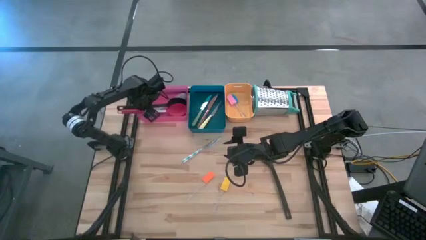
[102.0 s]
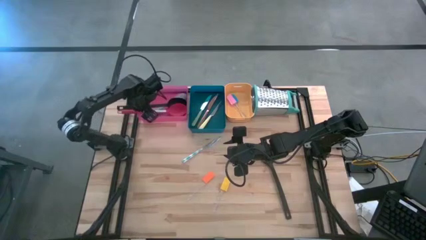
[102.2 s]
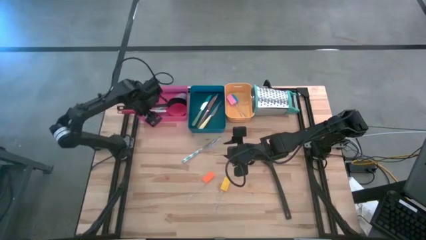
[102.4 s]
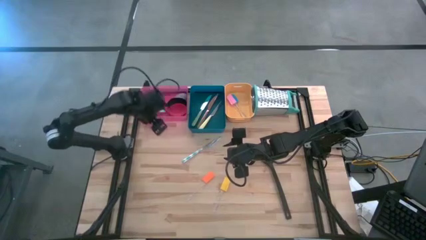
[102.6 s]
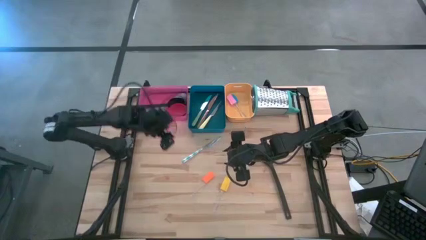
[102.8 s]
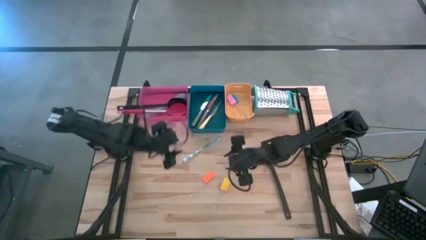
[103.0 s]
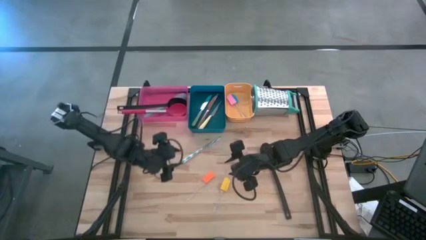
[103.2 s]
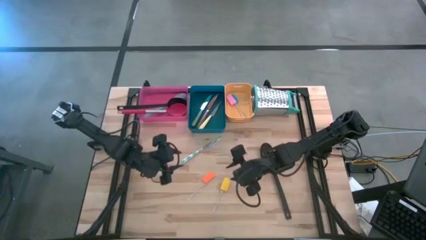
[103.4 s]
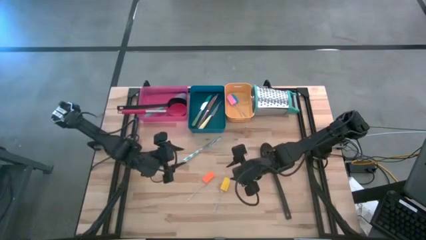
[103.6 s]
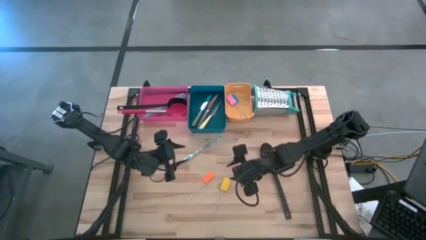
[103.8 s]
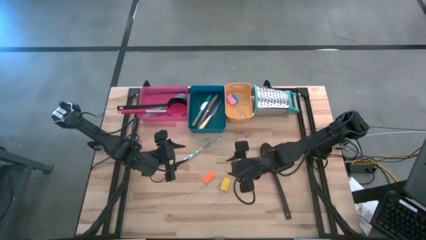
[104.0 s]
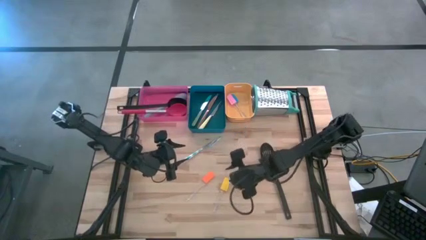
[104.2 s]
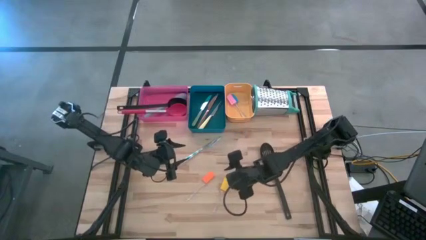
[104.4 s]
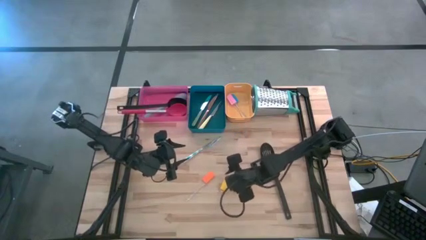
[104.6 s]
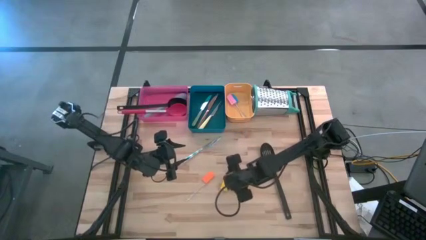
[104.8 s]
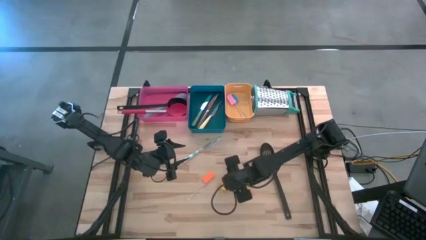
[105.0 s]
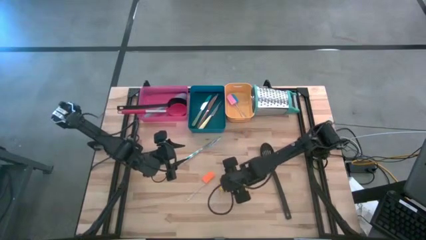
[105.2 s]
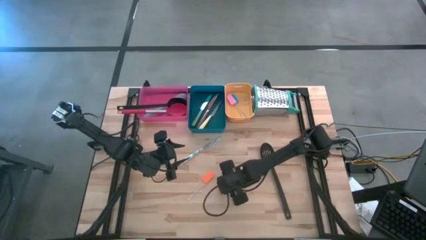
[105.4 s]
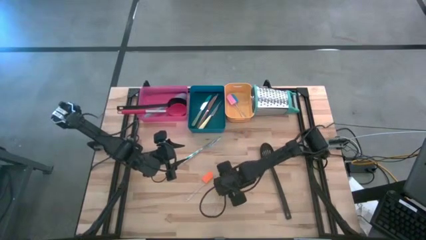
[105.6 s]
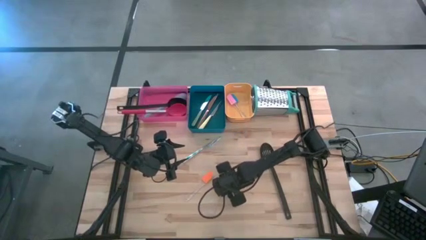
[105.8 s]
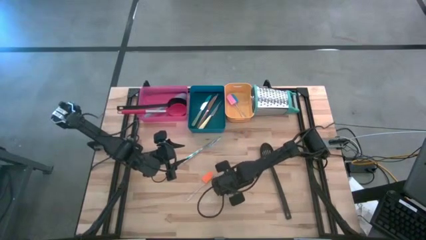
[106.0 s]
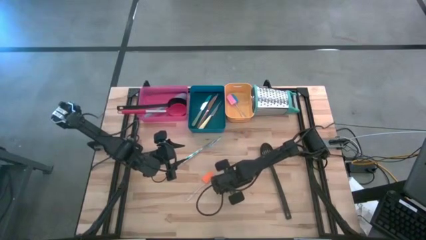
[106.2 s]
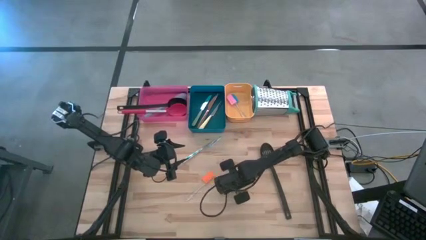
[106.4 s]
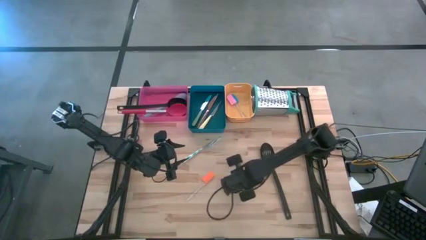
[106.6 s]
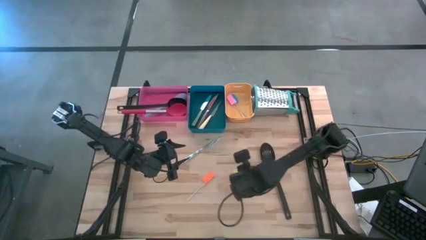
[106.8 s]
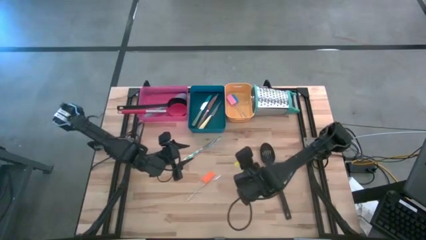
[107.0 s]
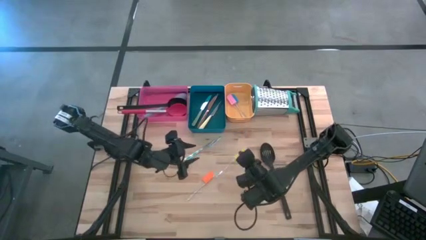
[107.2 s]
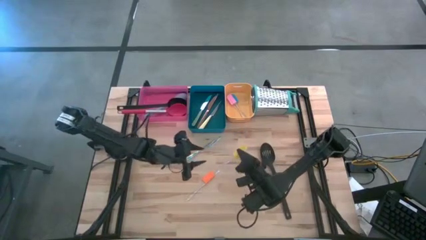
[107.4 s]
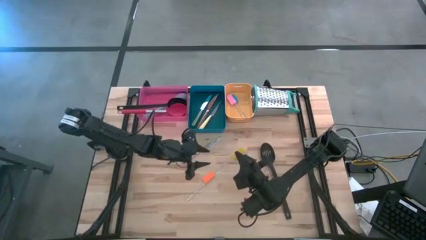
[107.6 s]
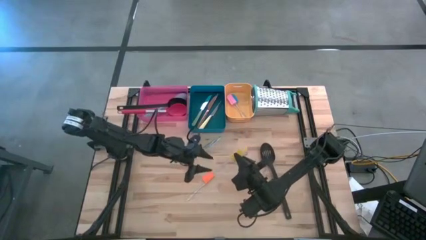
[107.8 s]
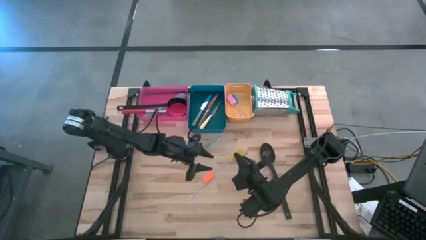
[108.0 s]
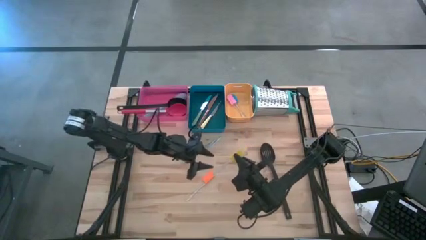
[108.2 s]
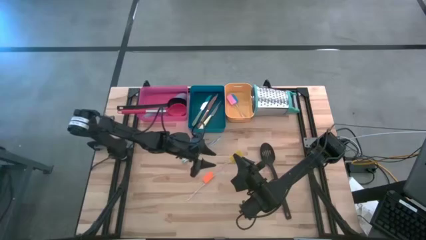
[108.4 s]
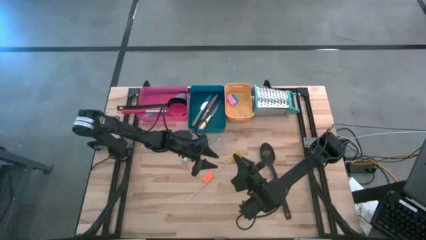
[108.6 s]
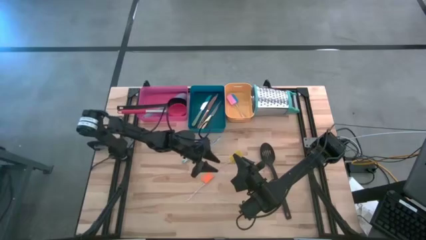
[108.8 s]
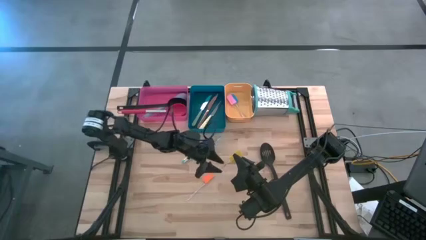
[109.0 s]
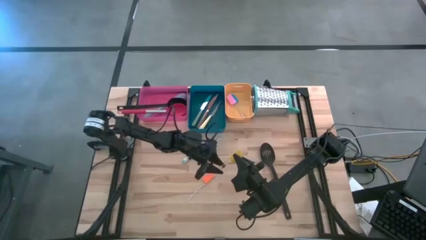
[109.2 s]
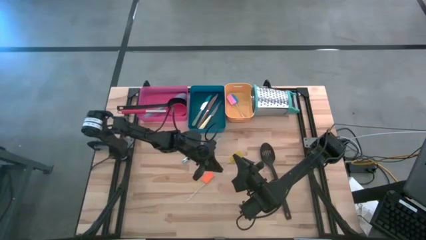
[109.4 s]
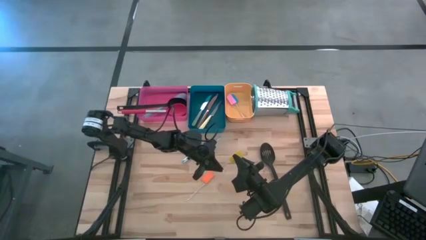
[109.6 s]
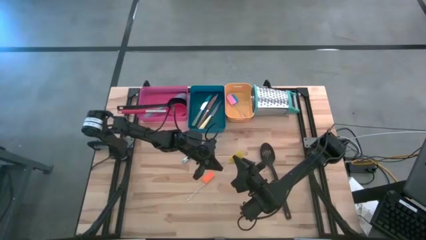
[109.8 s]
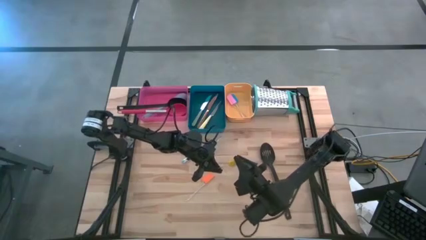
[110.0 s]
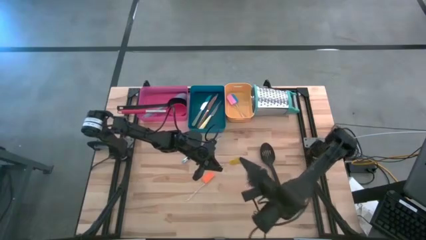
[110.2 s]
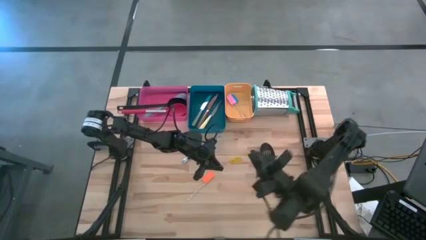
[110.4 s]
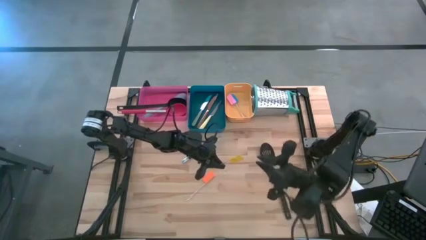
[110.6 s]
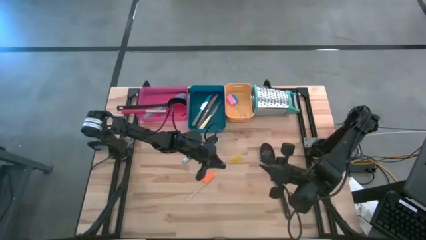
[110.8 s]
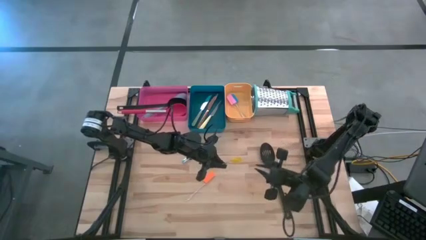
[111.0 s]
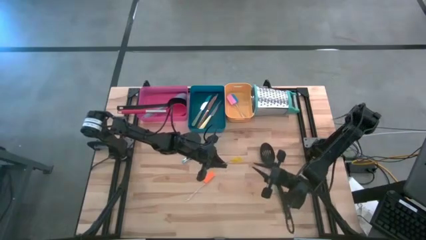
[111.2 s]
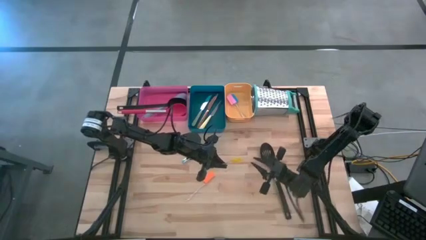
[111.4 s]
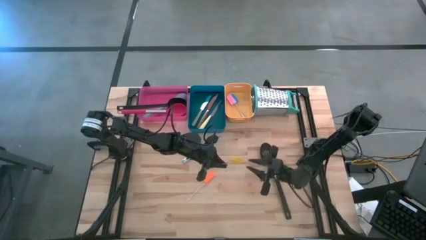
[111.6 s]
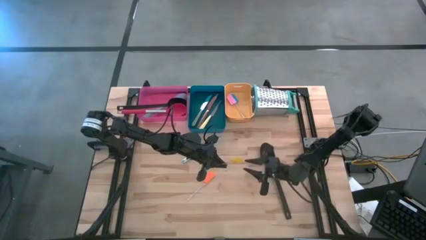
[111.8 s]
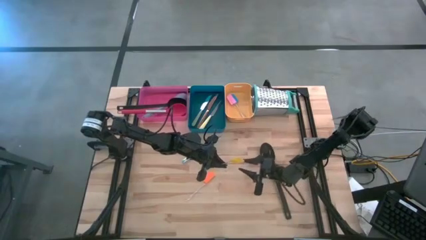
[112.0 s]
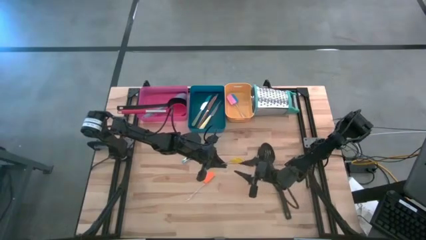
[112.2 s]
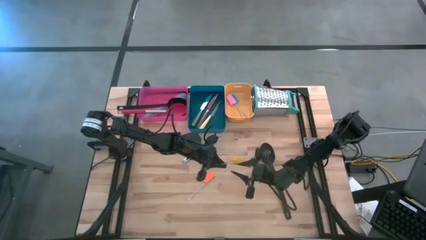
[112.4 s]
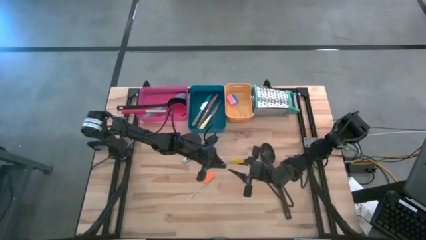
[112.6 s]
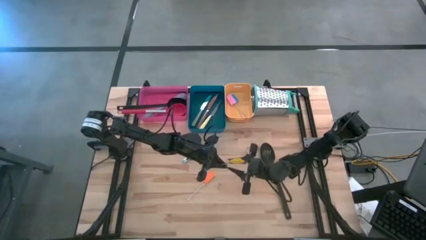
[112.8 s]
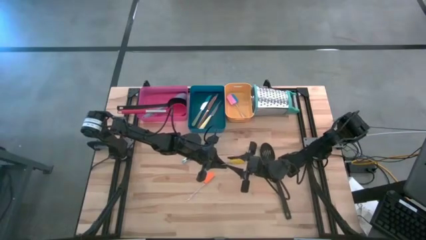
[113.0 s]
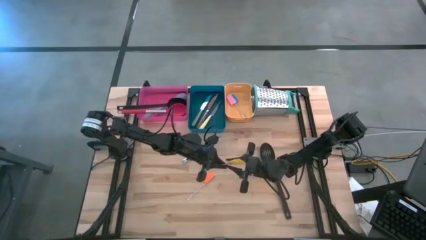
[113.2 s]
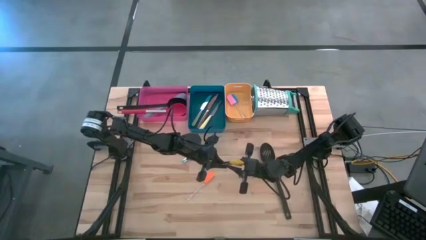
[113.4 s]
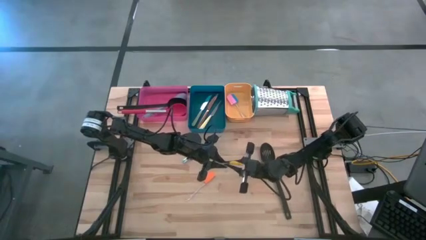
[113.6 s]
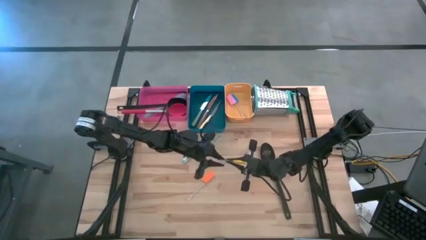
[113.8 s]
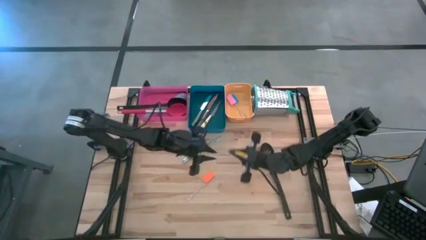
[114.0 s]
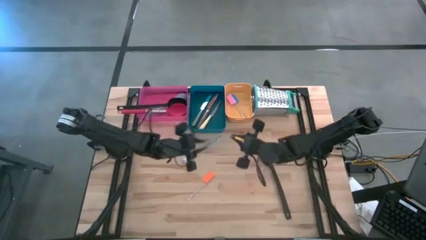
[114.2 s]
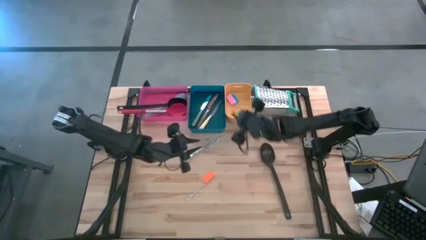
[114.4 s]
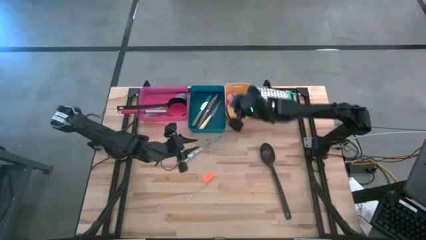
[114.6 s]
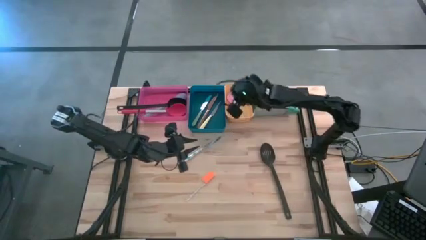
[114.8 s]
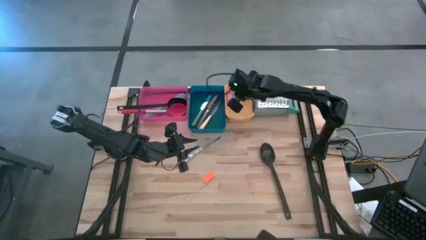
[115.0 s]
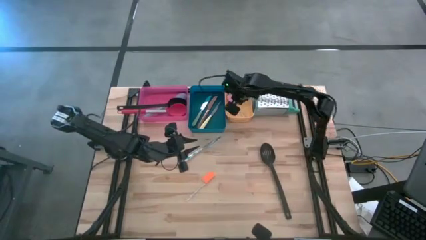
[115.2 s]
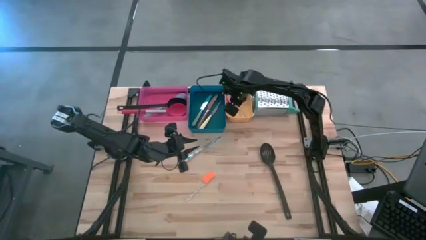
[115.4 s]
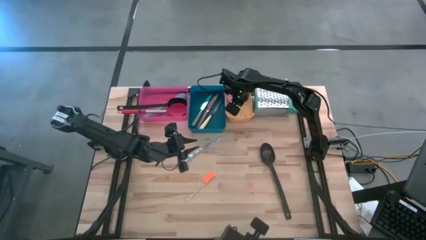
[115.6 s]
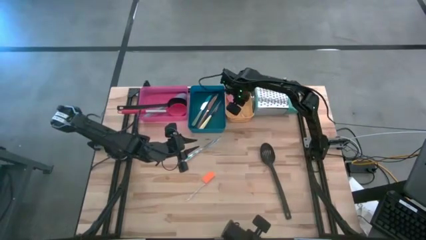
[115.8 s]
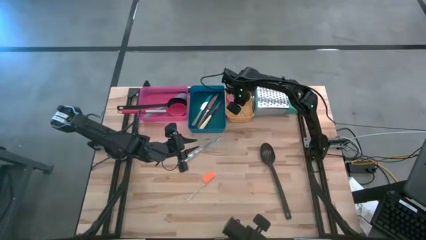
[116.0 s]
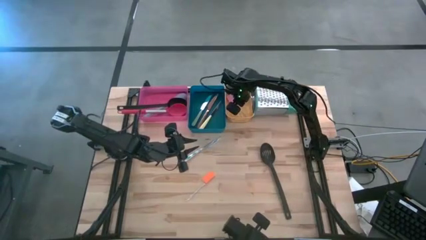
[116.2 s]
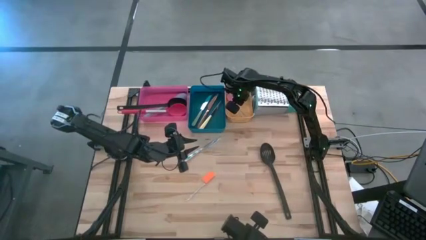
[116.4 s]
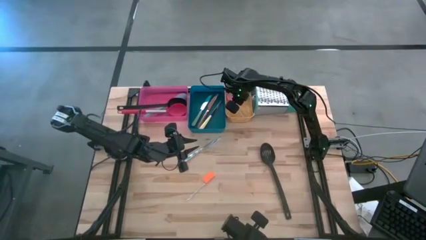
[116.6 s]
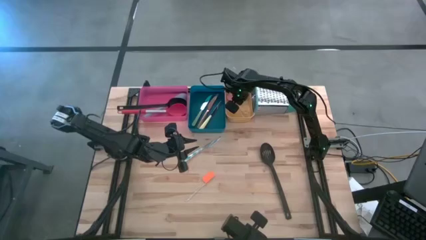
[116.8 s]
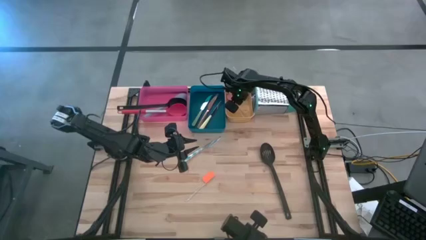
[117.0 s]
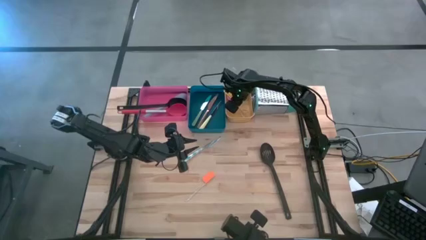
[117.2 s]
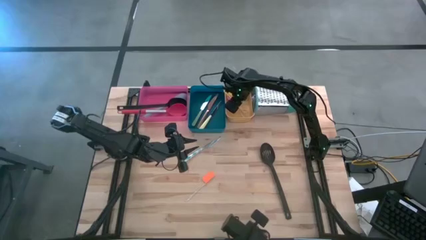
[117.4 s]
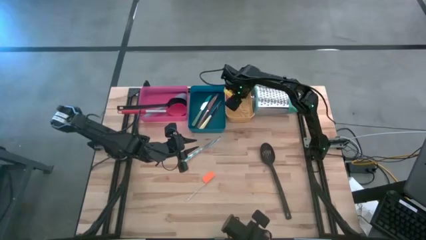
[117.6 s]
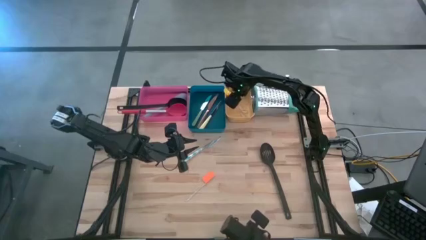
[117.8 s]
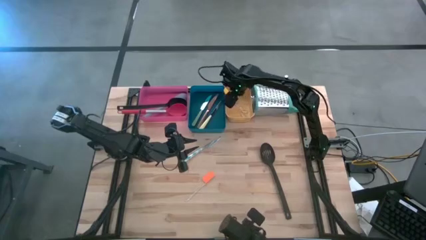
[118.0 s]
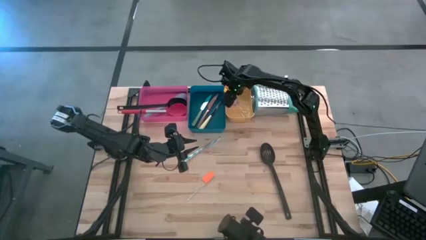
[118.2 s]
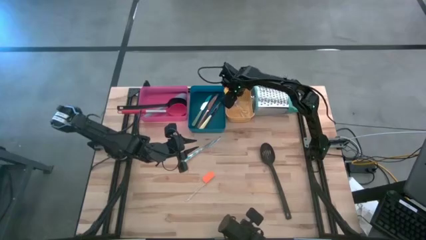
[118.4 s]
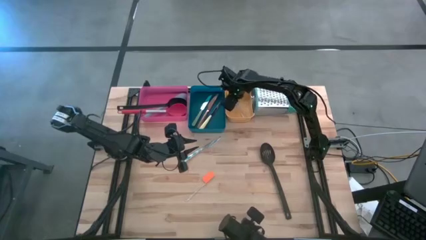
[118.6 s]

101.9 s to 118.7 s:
Task: Pick & Place Kitchen Items
Put the yellow spatula into the yellow bin

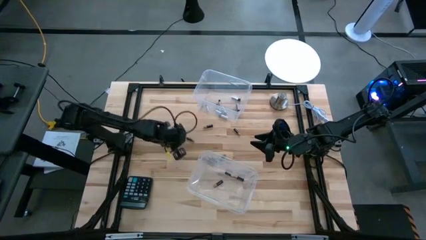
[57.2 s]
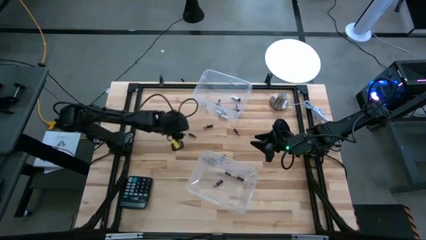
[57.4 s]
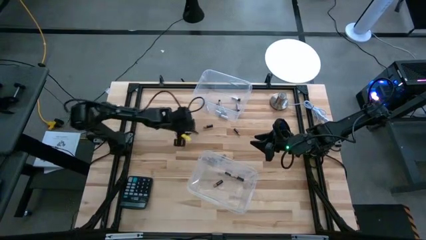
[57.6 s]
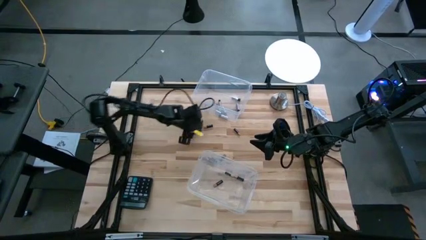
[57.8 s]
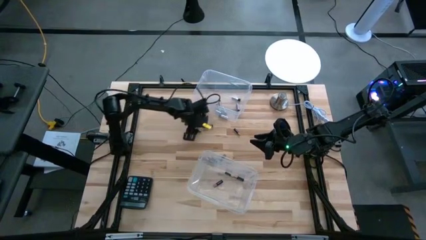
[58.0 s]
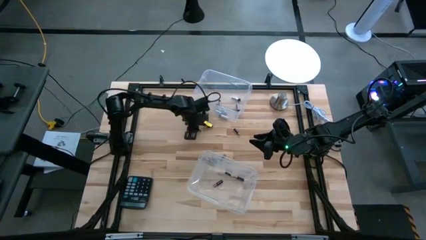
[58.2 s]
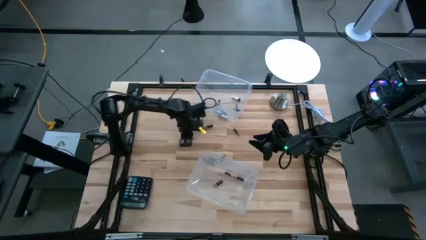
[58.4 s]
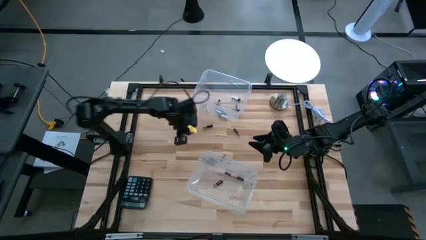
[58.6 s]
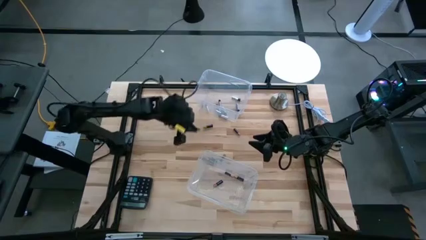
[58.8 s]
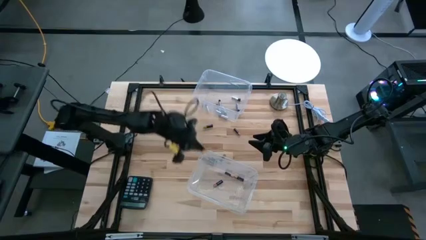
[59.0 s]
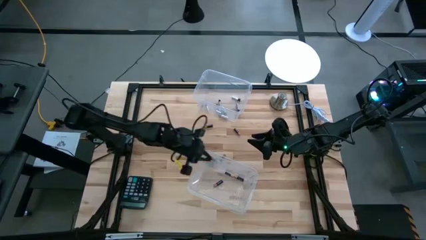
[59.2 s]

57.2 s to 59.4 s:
Task: Sort batteries
Put the black battery into the bottom transparent bin
